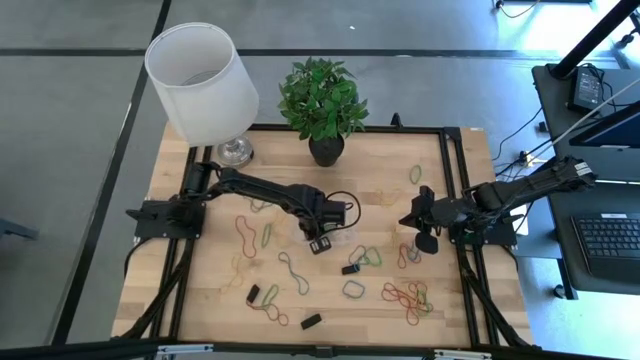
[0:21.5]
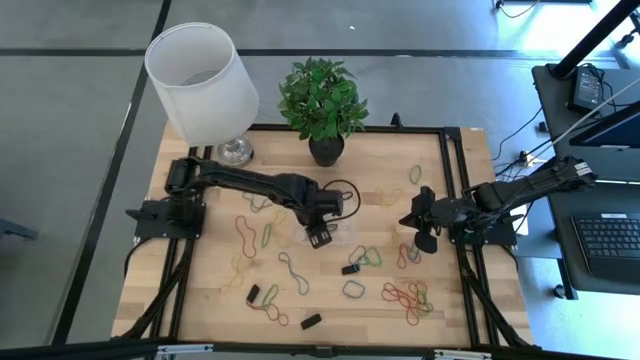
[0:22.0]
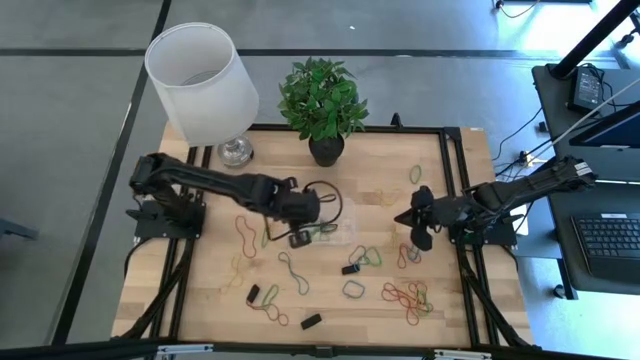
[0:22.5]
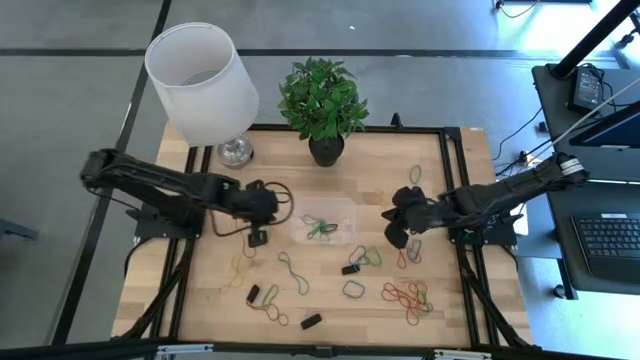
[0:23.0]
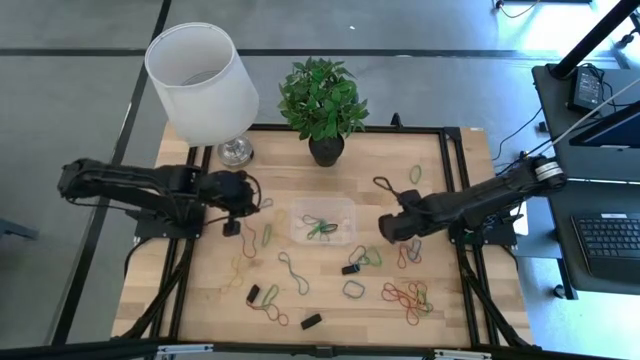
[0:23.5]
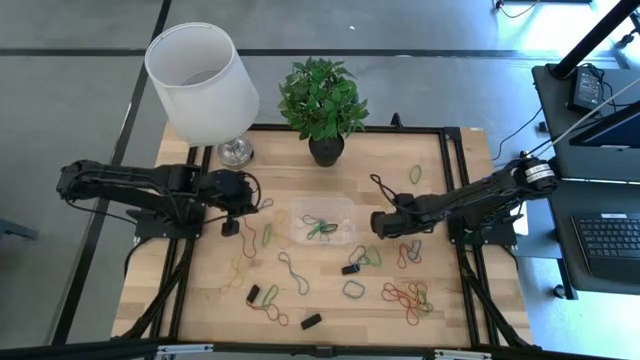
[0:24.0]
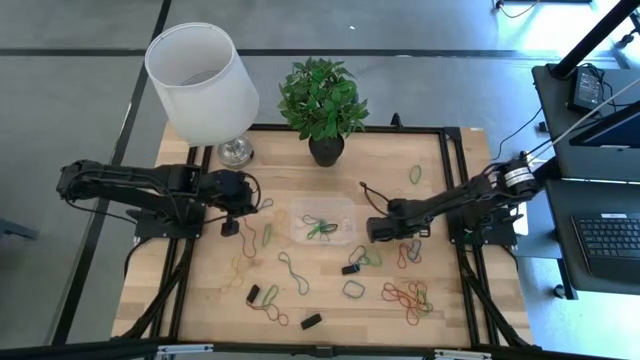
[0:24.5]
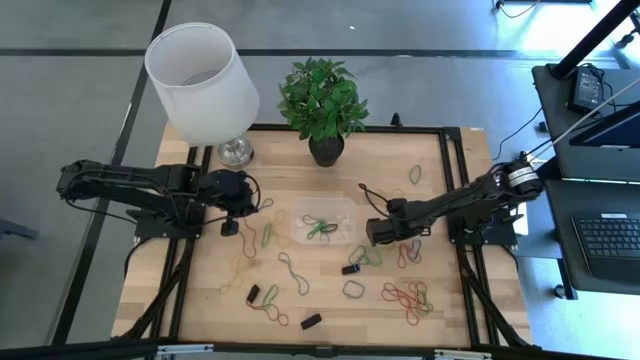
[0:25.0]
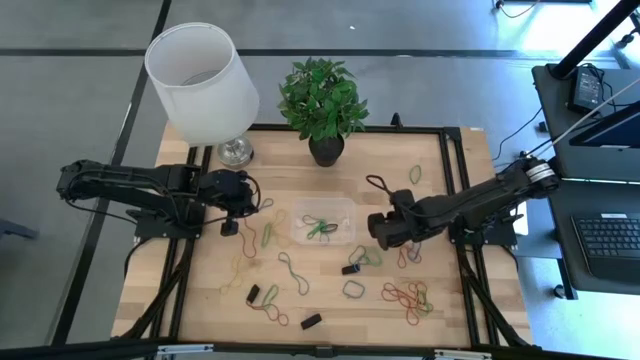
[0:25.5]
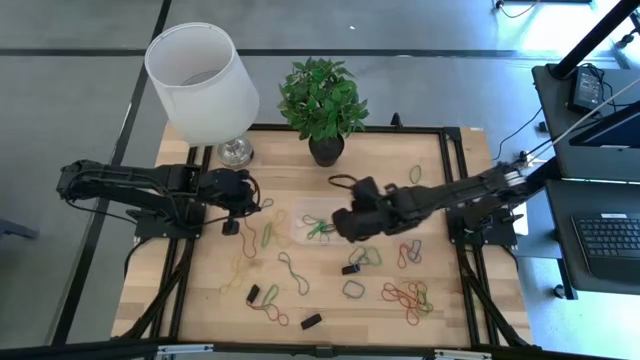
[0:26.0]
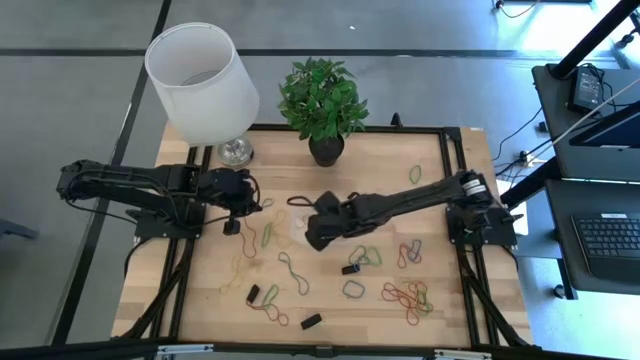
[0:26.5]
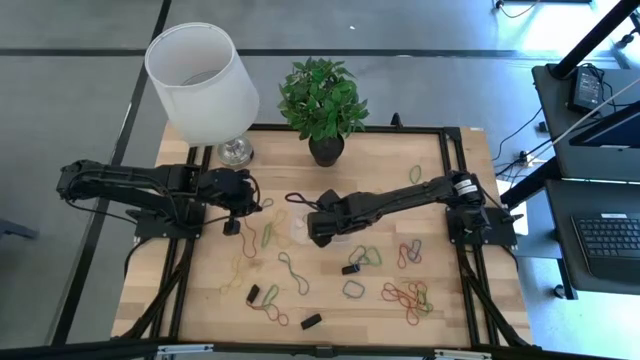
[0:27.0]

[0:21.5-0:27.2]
Task: Pick and place rubber bands into bin
Put the yellow rubber band into the transparent container

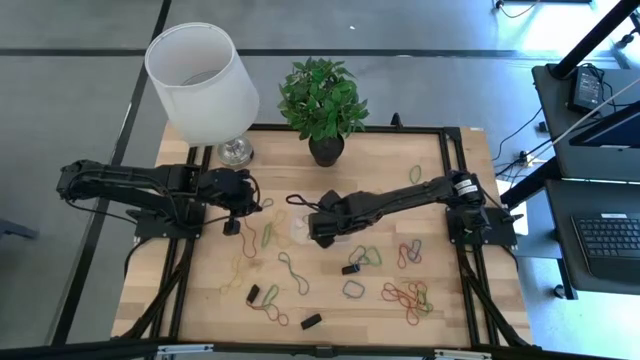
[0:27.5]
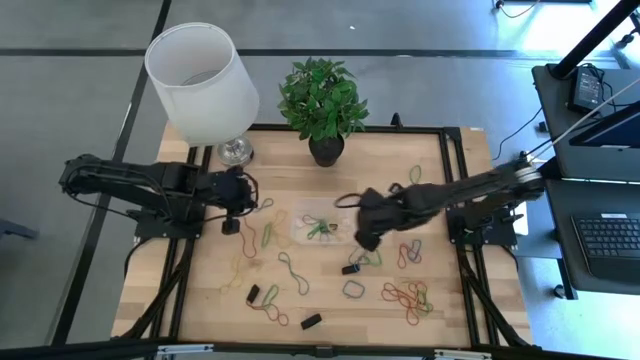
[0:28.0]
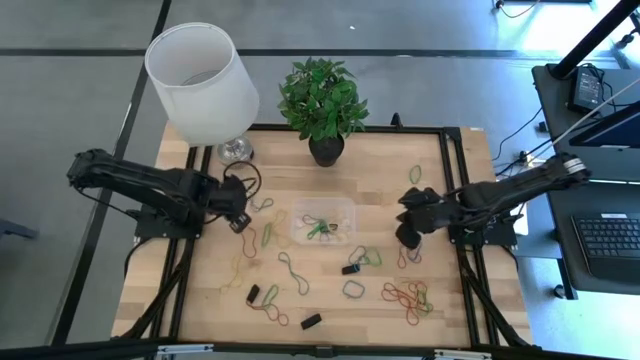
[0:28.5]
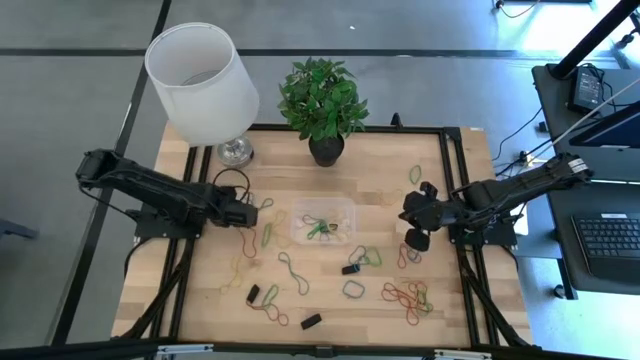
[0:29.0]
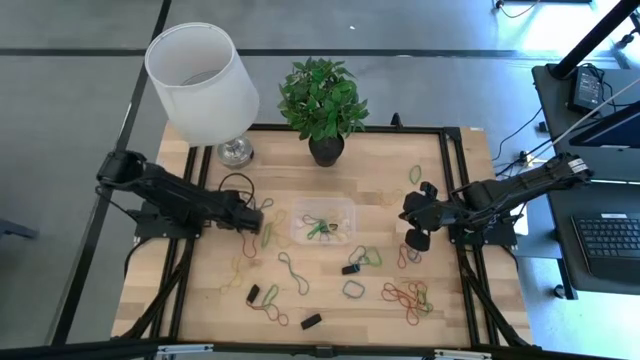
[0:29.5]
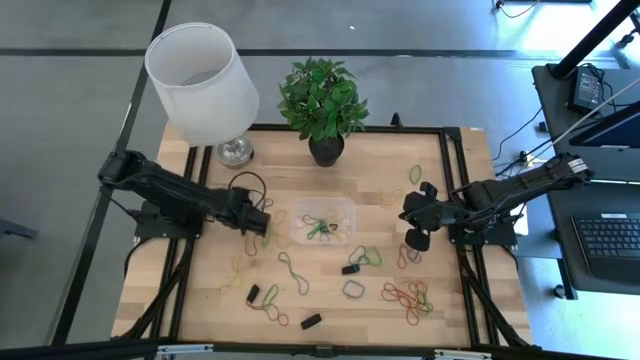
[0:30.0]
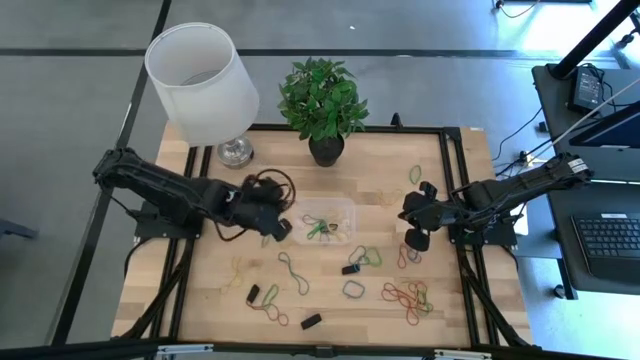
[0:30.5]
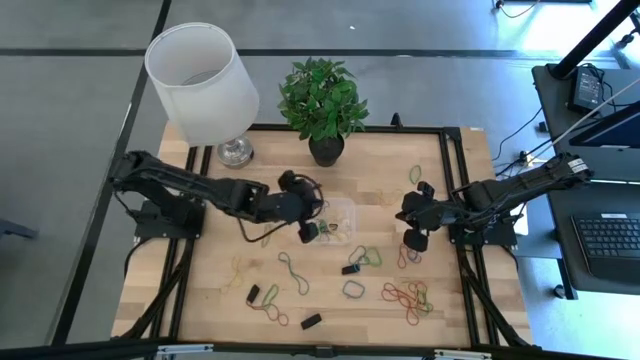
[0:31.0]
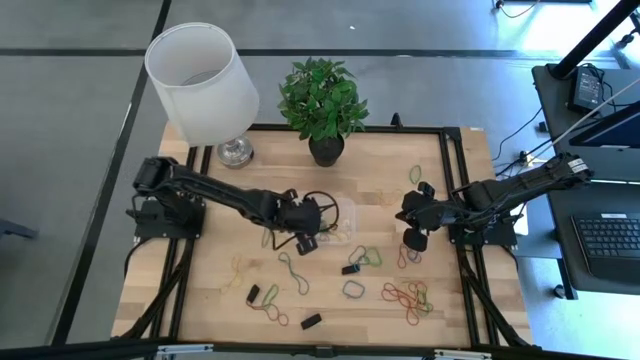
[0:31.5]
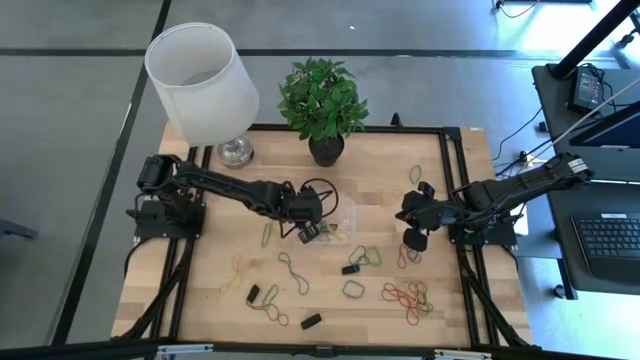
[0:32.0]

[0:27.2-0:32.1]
Put the red rubber band into the transparent container

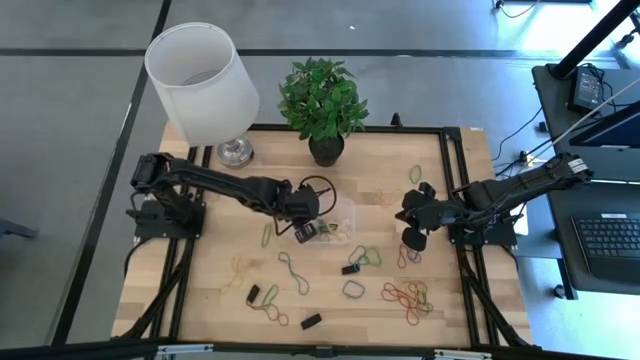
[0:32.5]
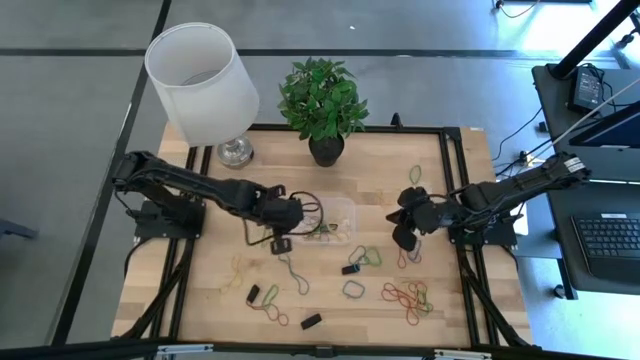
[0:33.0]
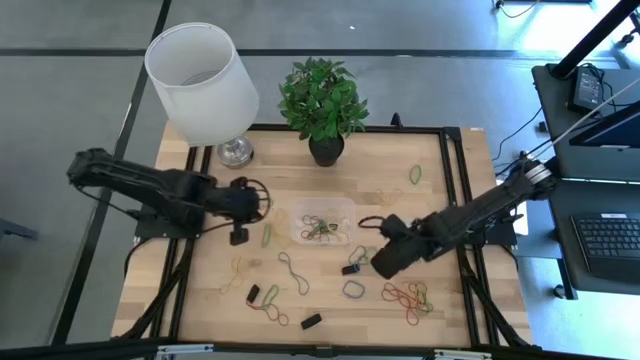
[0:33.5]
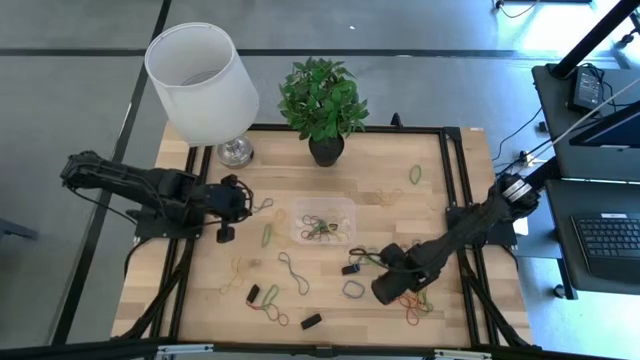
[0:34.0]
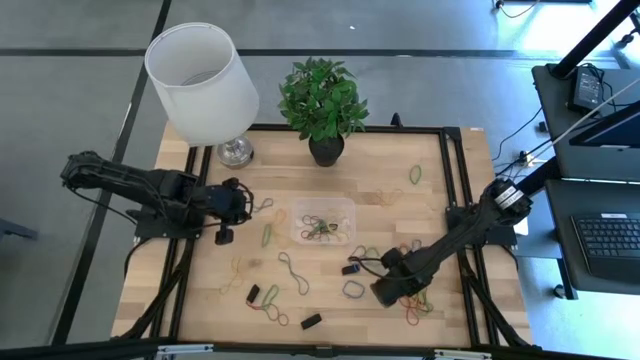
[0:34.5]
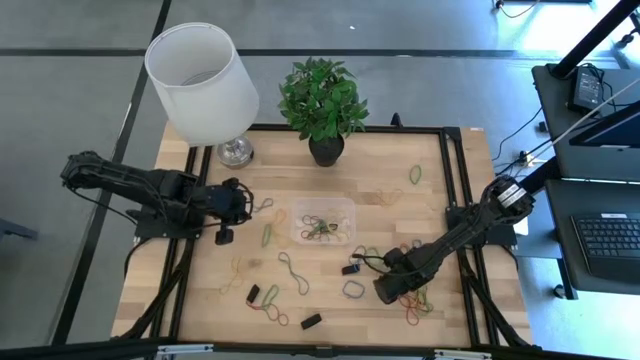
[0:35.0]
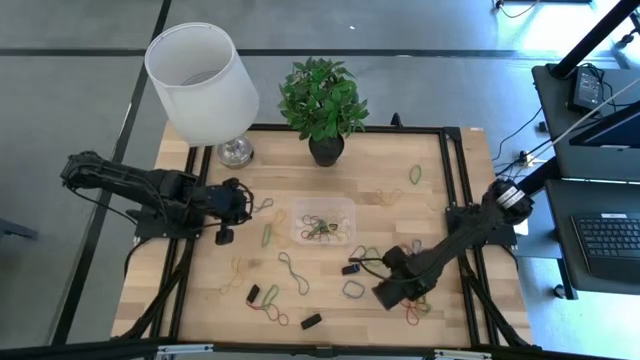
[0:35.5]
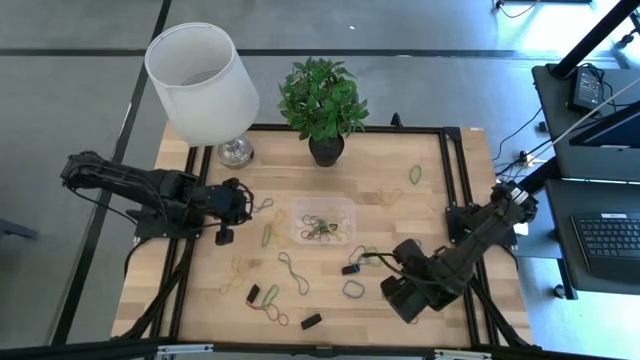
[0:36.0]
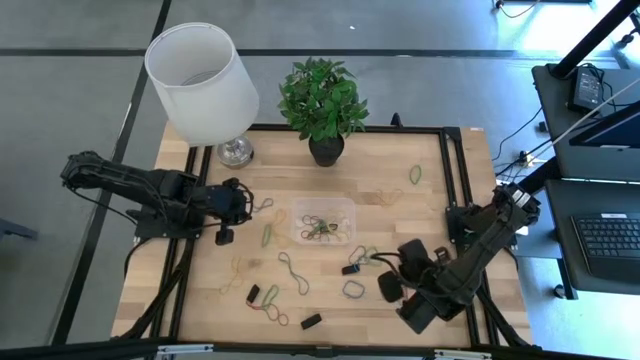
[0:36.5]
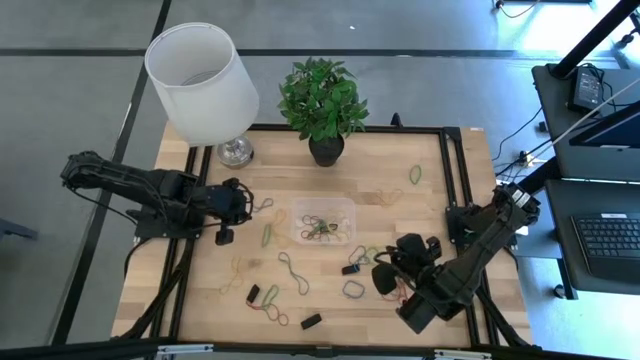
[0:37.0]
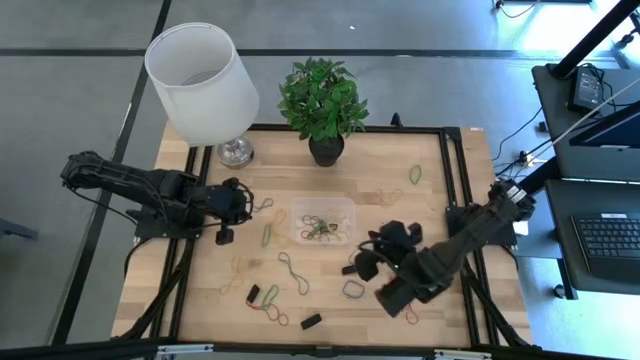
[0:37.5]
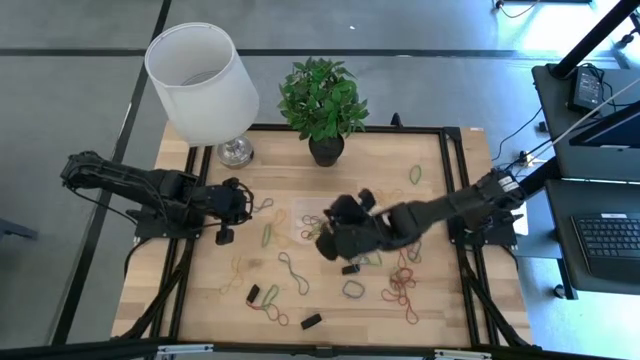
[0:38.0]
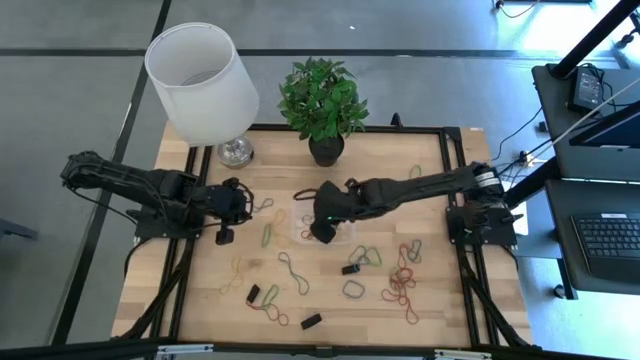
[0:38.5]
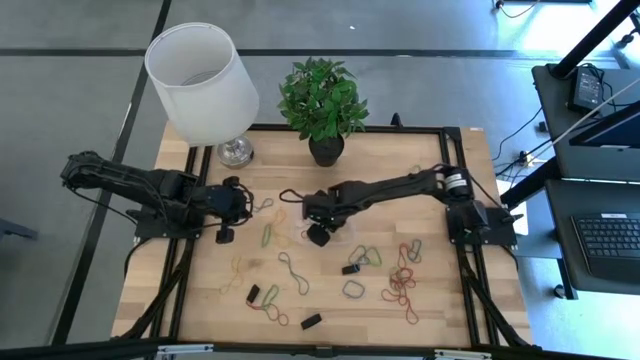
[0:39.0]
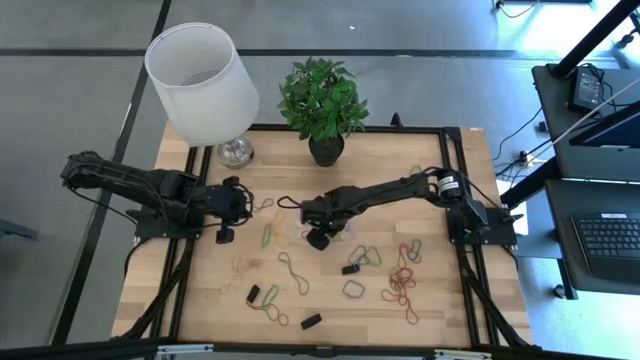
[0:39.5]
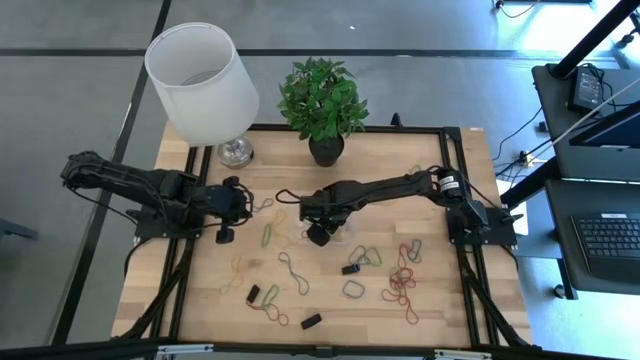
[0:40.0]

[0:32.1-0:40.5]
Put the yellow rubber band into the transparent container

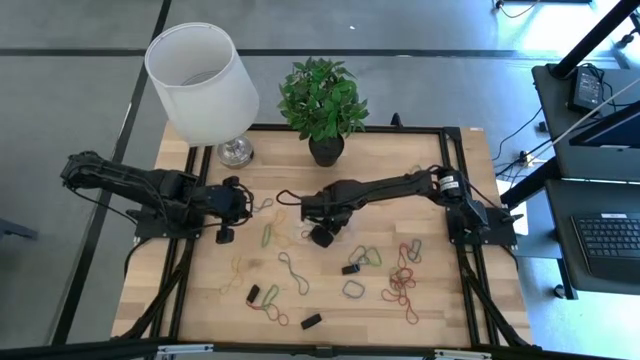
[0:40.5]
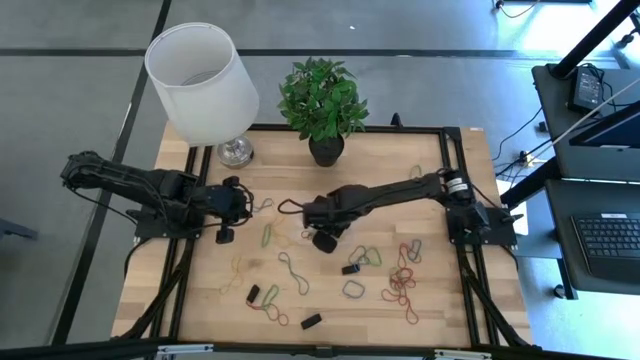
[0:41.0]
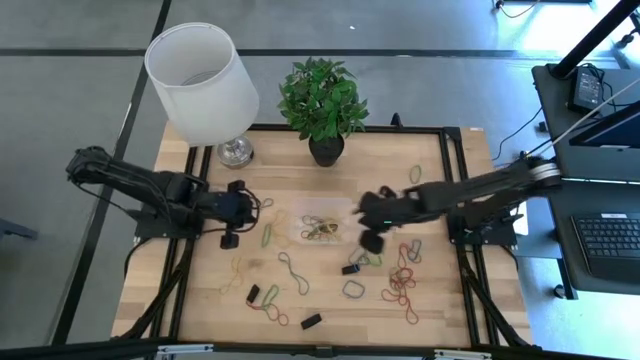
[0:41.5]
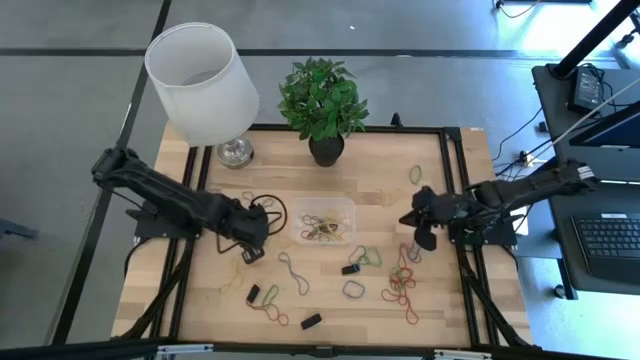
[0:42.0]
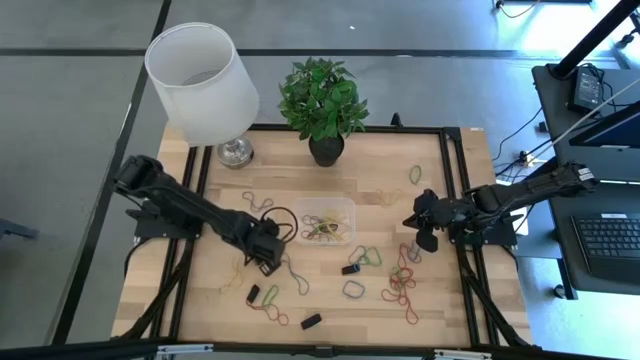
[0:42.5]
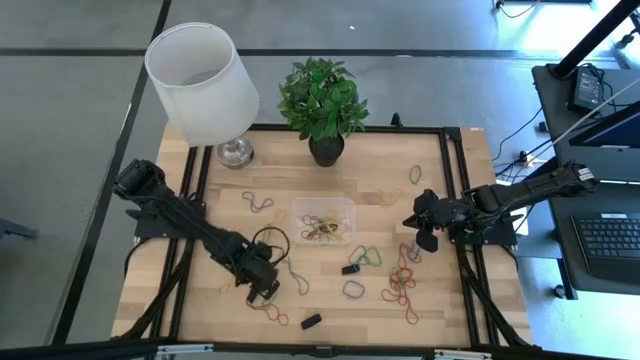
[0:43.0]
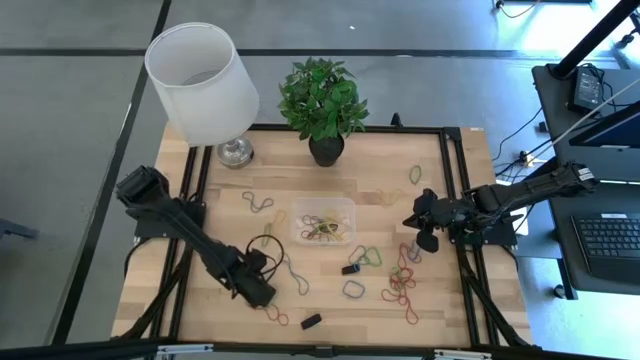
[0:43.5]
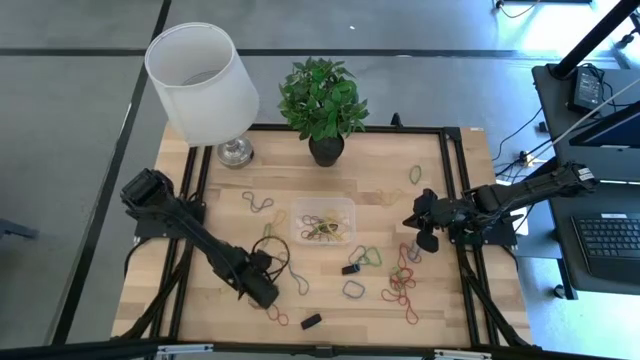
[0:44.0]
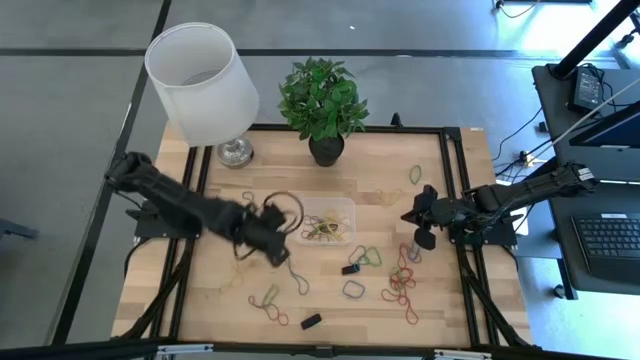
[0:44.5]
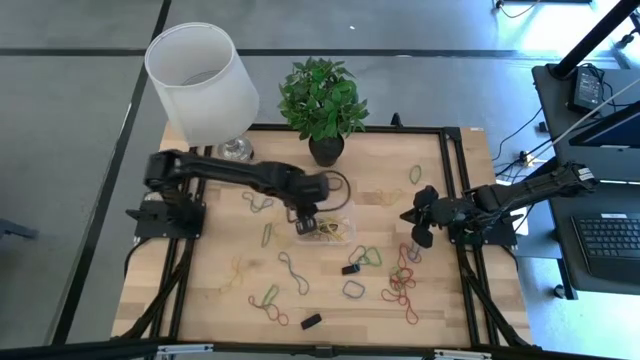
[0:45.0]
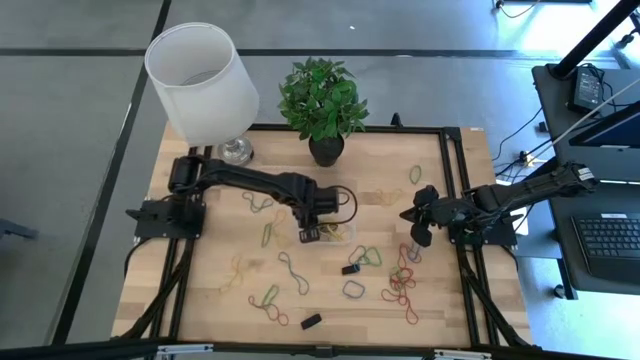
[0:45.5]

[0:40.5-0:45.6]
Put the bottom left black rubber band into the transparent container
